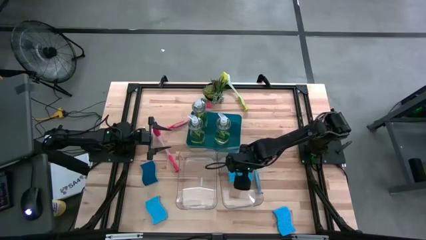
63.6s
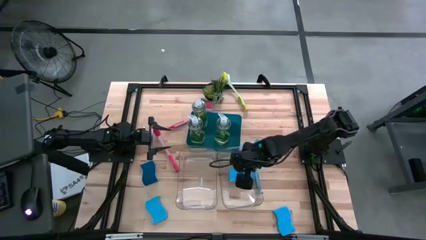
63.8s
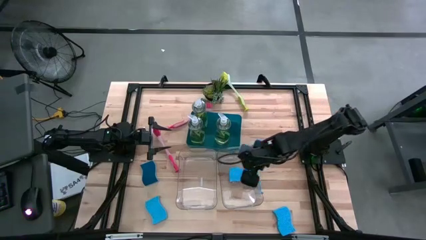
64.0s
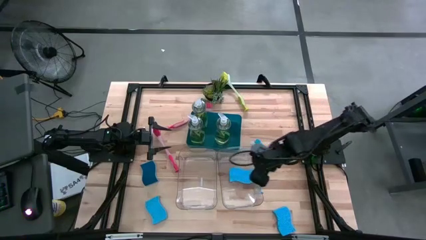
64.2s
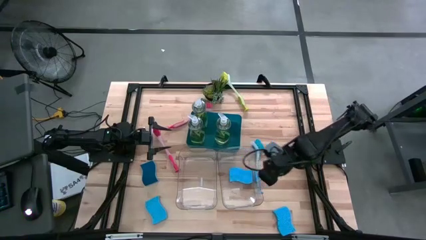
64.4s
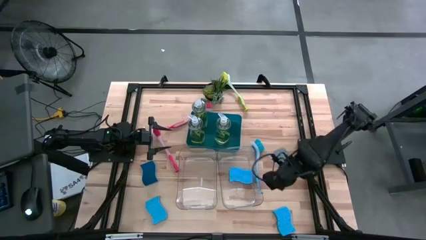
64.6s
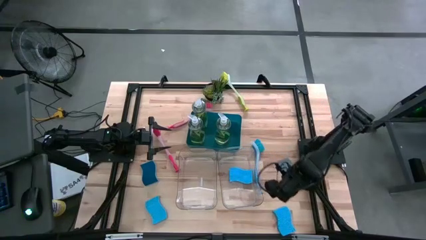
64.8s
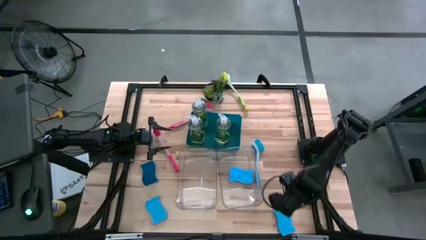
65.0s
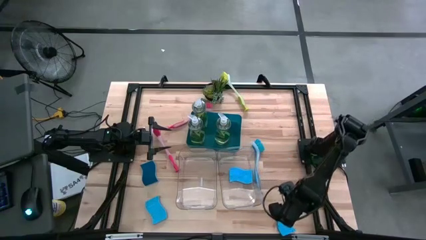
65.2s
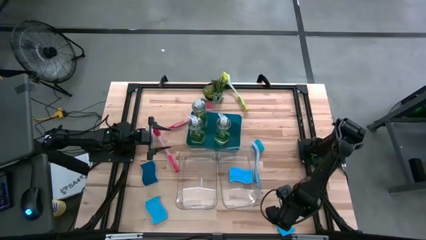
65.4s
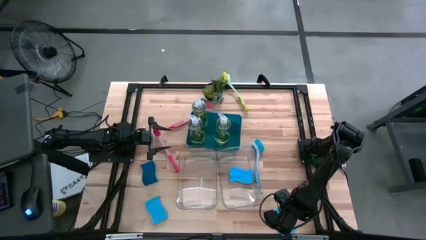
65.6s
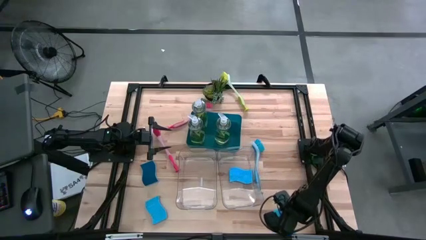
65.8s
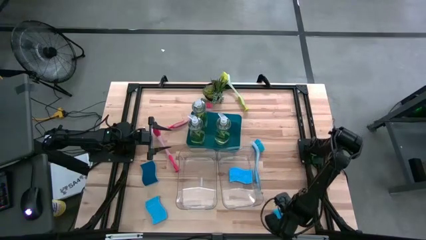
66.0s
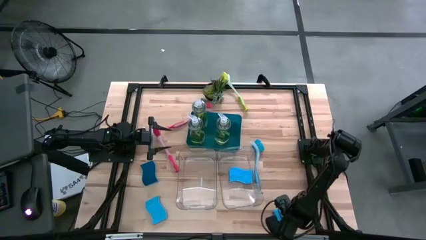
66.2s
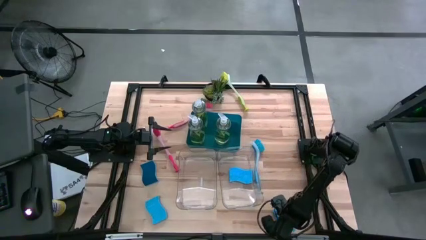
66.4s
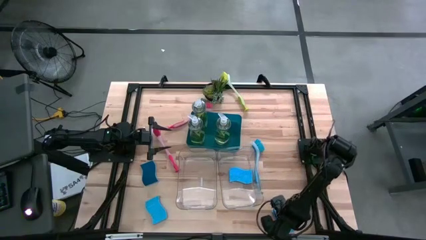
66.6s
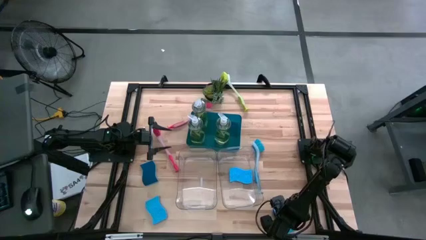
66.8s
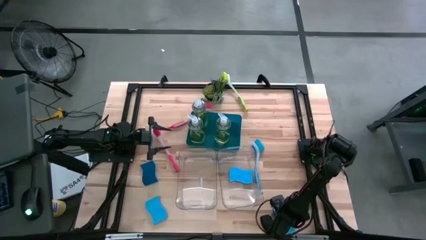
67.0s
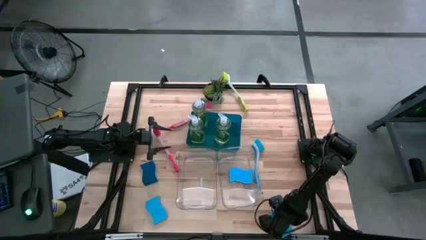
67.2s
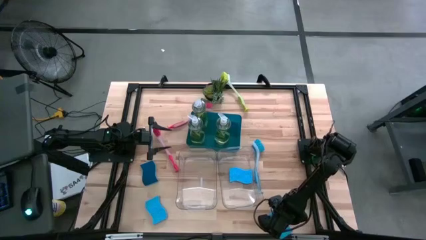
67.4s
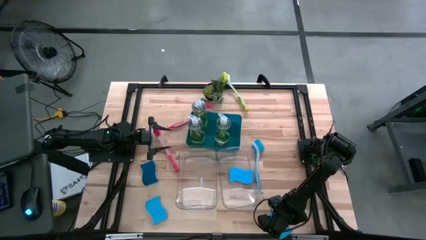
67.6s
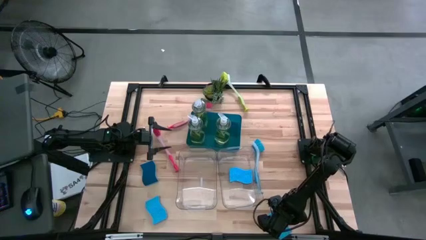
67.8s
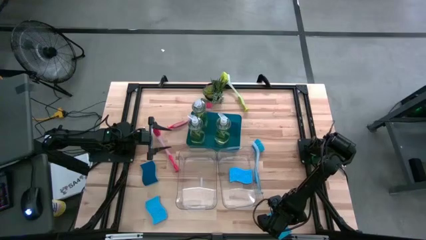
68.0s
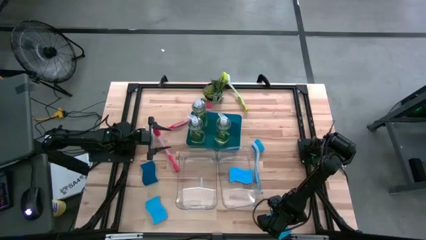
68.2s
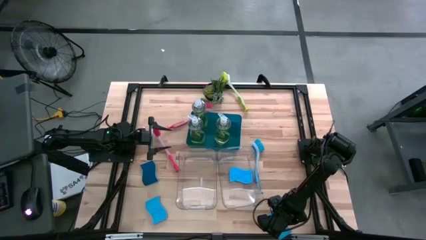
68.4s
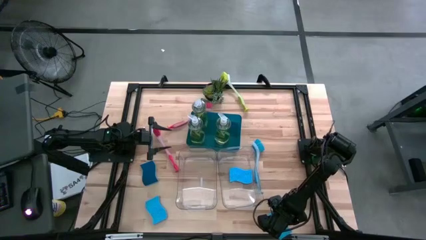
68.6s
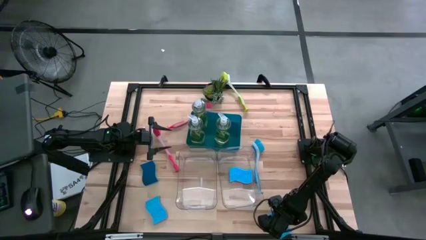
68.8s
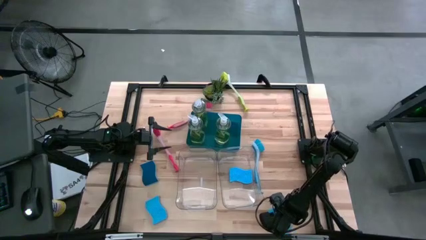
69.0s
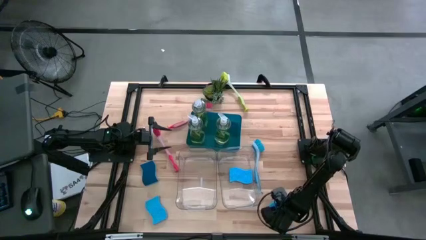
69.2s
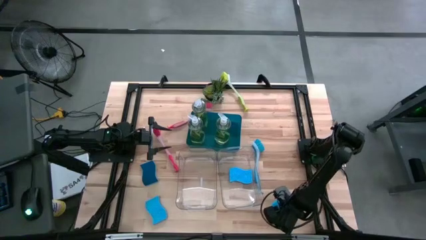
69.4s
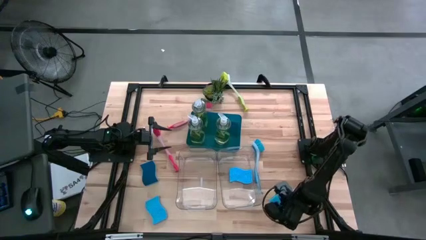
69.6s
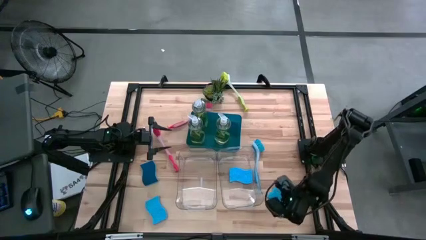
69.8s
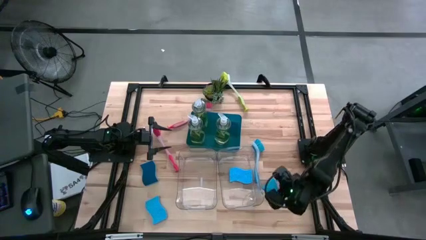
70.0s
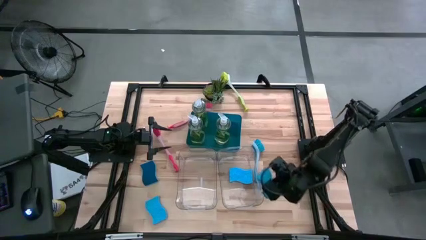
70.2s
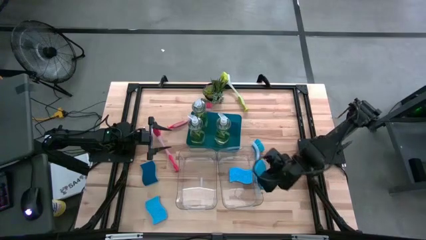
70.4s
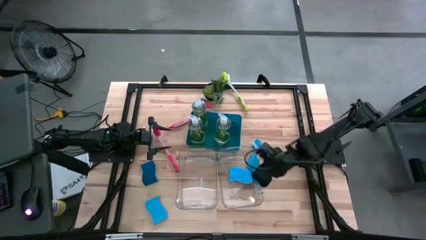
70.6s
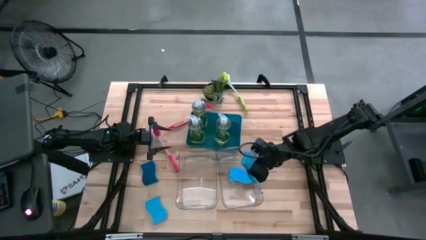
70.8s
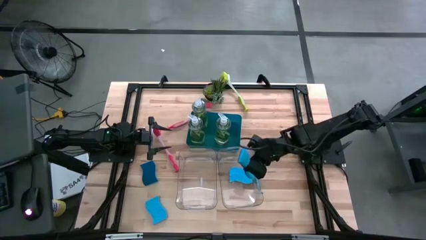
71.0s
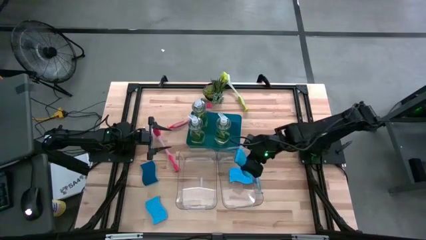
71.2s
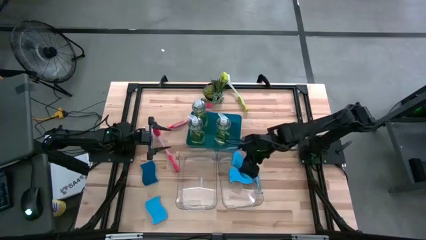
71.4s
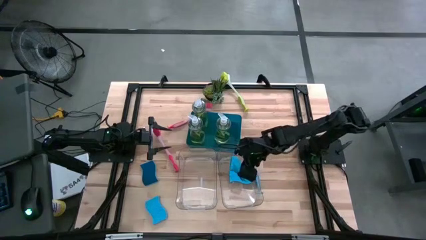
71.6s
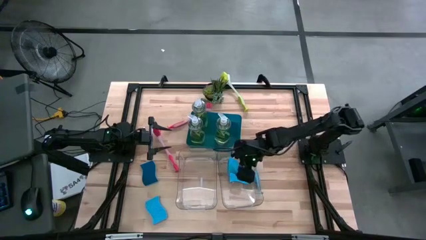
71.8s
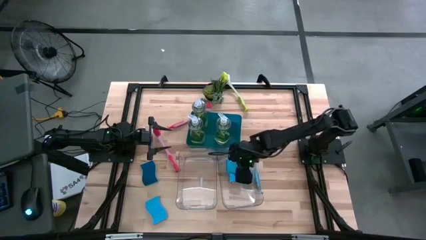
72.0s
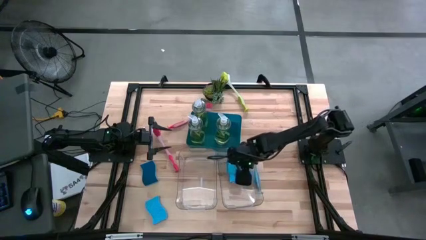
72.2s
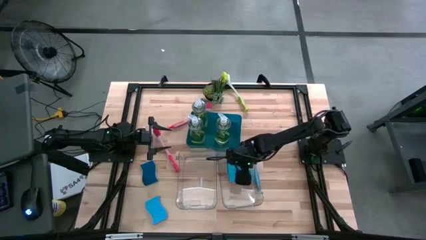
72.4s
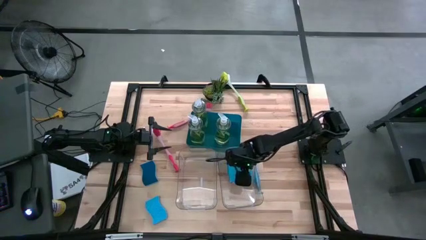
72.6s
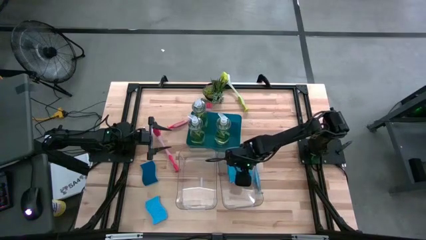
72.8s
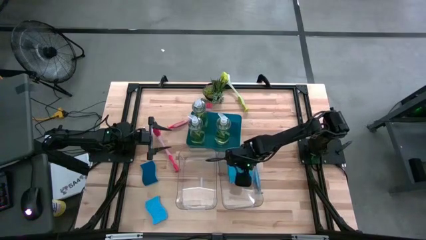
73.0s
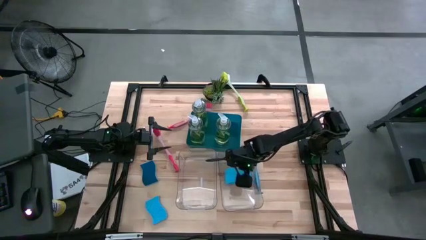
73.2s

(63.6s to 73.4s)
Task: Pick & Place Kitchen Sink Supplies
Put the blue sponge into the right transparent bin
